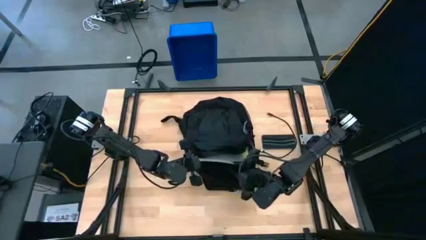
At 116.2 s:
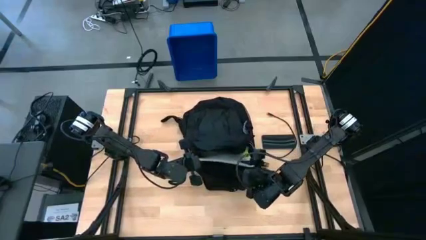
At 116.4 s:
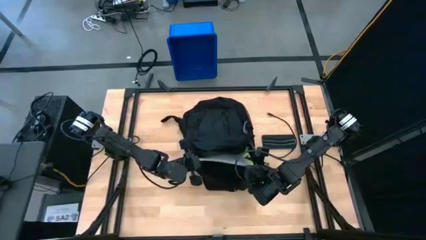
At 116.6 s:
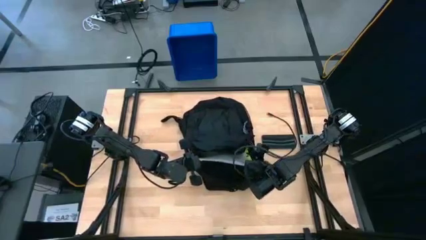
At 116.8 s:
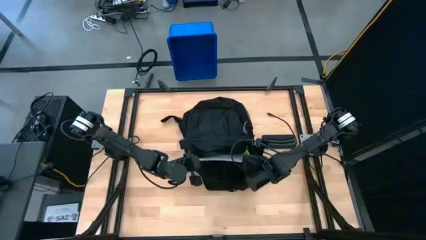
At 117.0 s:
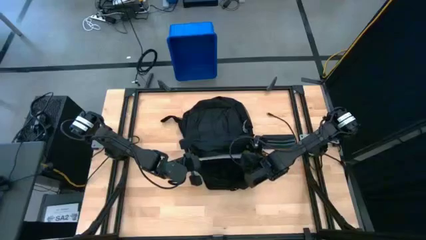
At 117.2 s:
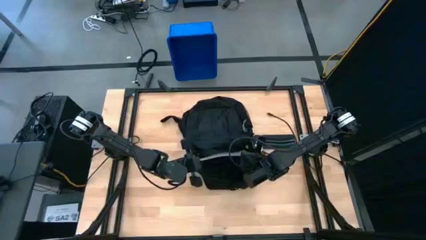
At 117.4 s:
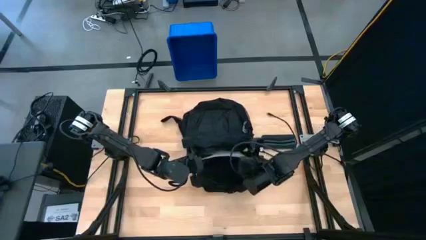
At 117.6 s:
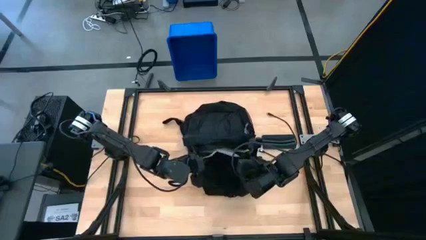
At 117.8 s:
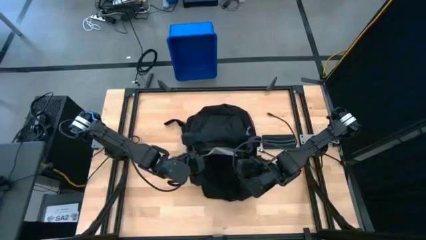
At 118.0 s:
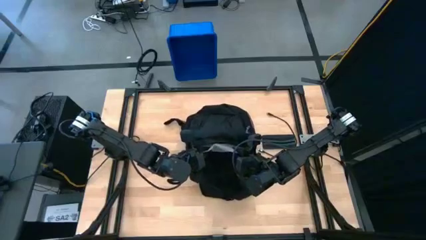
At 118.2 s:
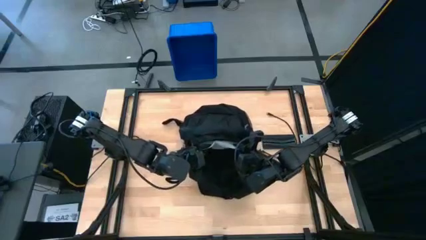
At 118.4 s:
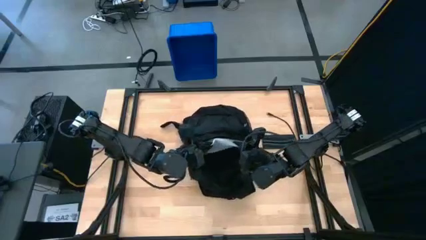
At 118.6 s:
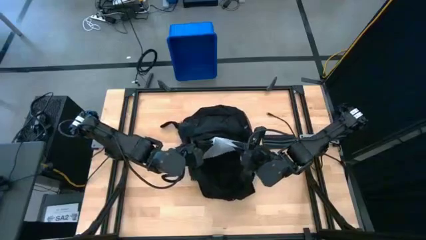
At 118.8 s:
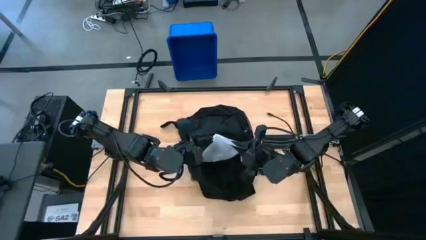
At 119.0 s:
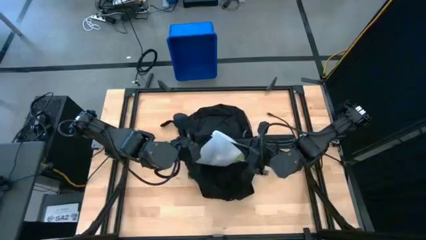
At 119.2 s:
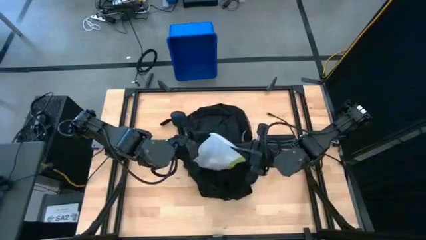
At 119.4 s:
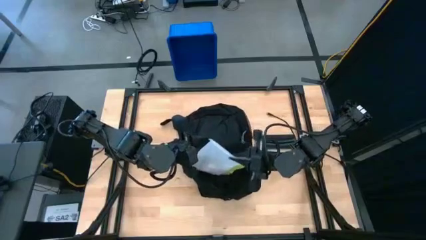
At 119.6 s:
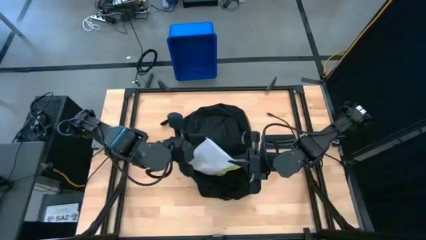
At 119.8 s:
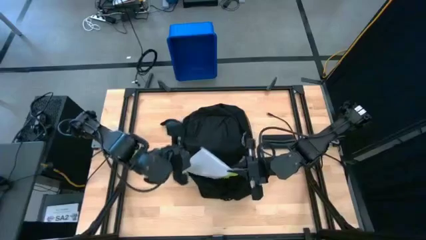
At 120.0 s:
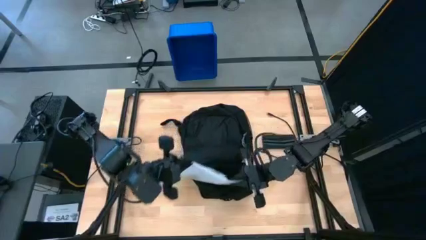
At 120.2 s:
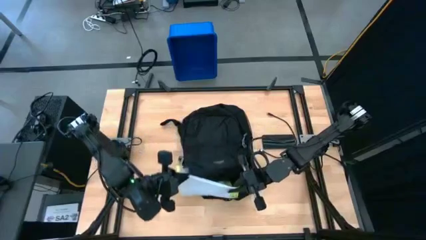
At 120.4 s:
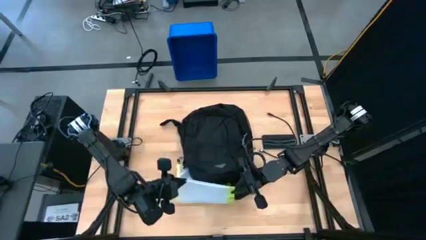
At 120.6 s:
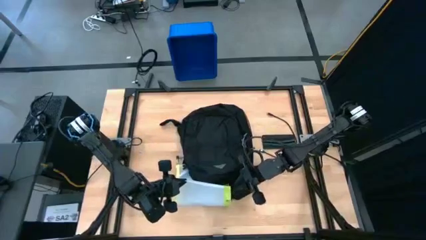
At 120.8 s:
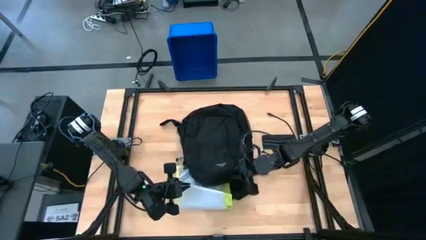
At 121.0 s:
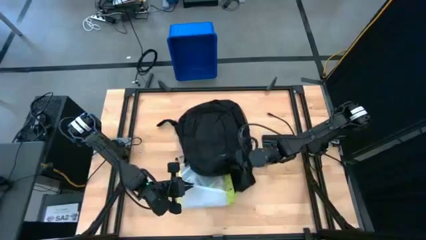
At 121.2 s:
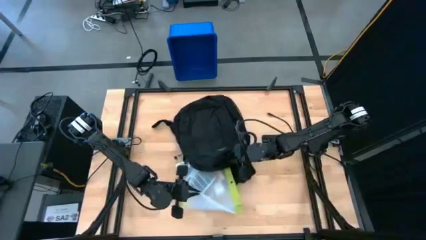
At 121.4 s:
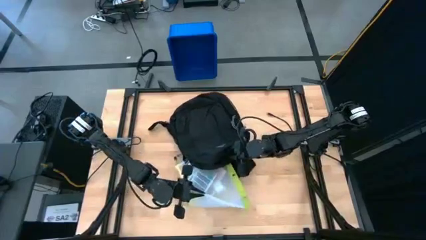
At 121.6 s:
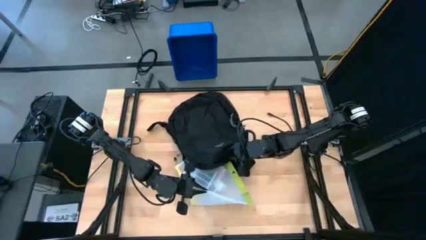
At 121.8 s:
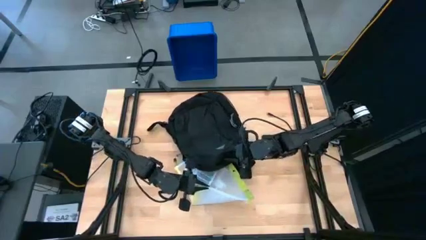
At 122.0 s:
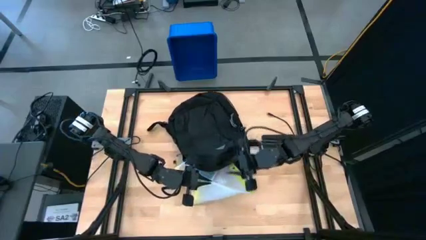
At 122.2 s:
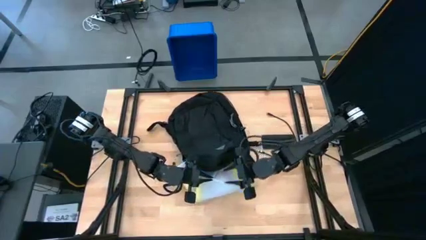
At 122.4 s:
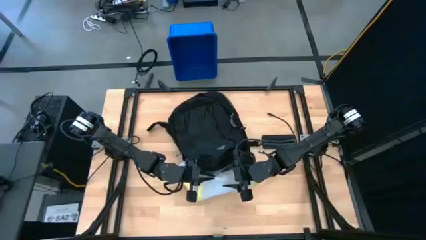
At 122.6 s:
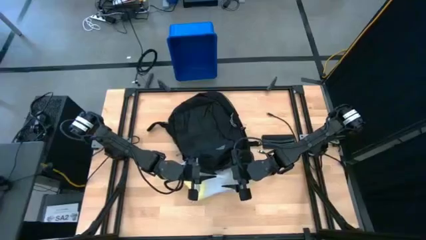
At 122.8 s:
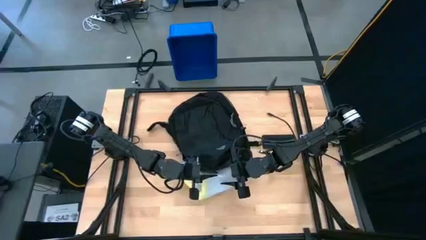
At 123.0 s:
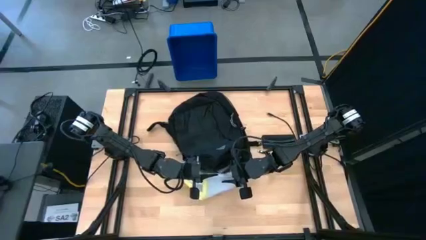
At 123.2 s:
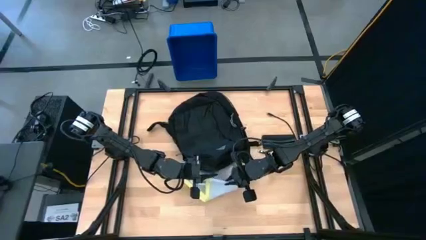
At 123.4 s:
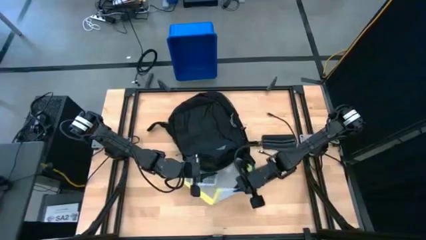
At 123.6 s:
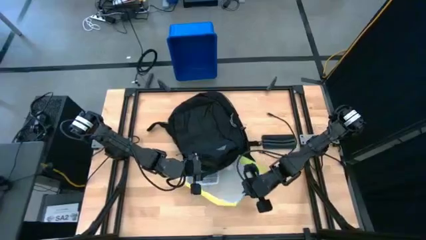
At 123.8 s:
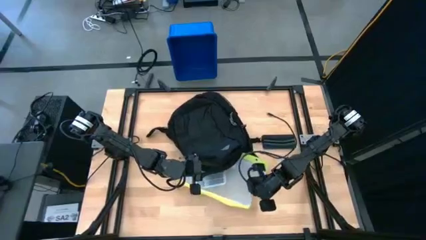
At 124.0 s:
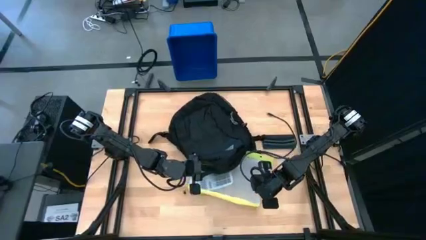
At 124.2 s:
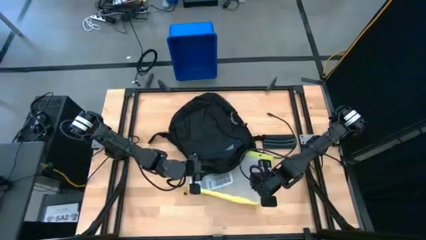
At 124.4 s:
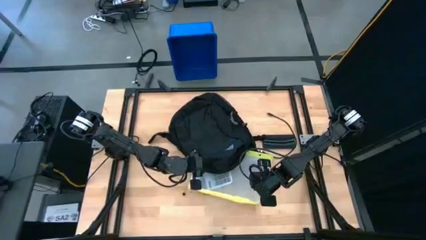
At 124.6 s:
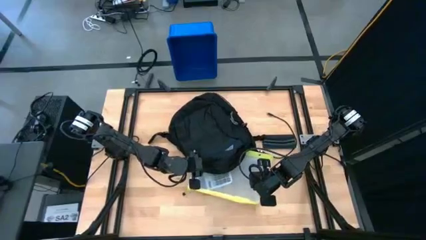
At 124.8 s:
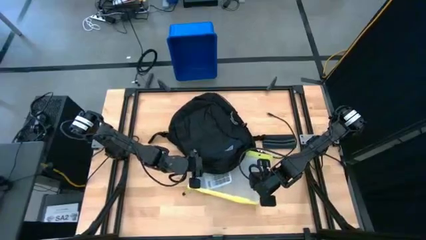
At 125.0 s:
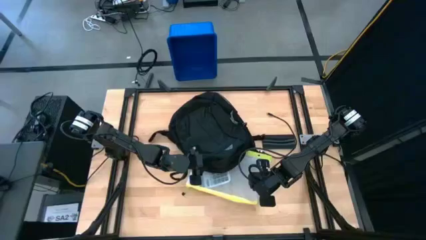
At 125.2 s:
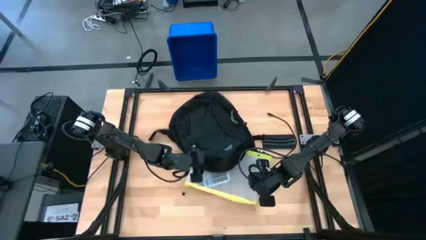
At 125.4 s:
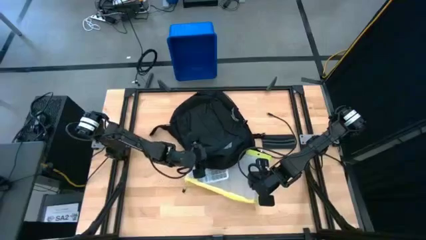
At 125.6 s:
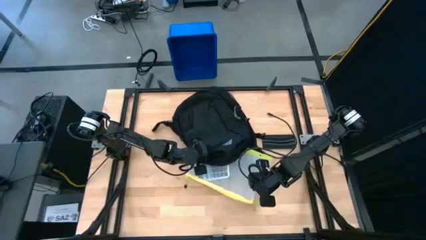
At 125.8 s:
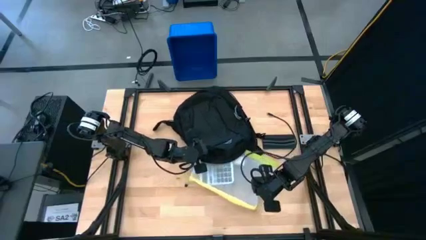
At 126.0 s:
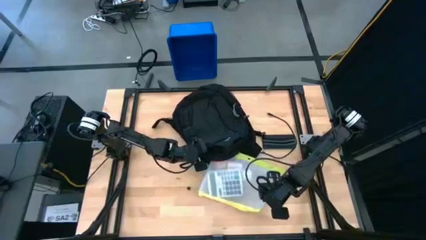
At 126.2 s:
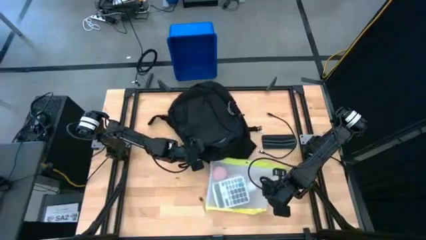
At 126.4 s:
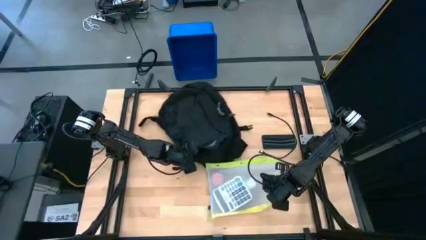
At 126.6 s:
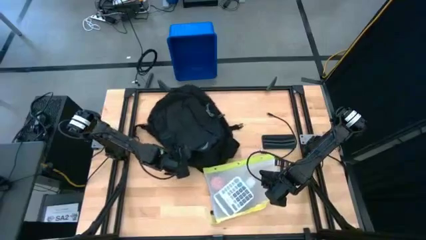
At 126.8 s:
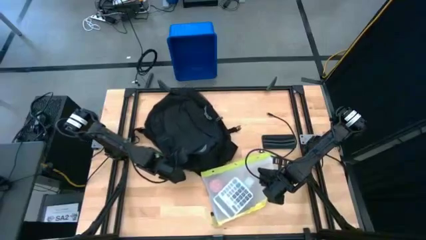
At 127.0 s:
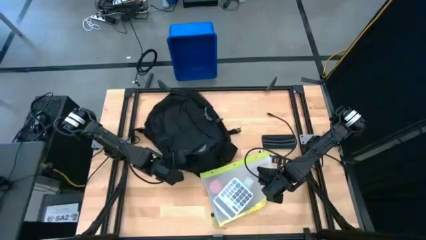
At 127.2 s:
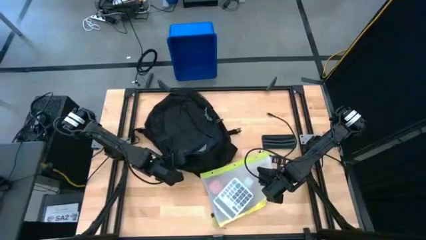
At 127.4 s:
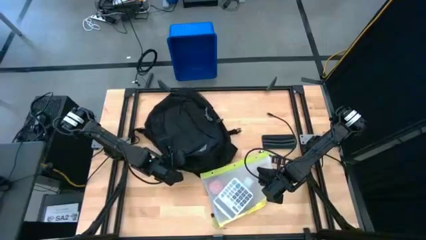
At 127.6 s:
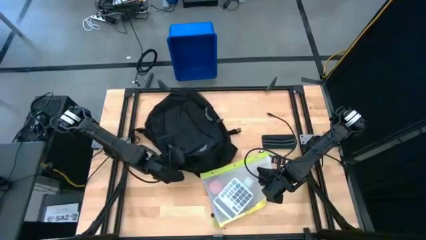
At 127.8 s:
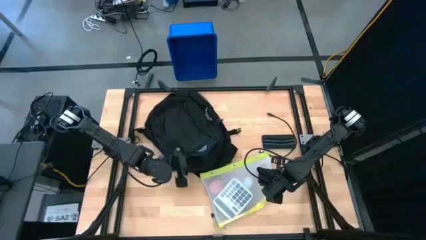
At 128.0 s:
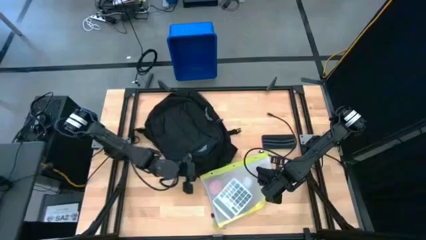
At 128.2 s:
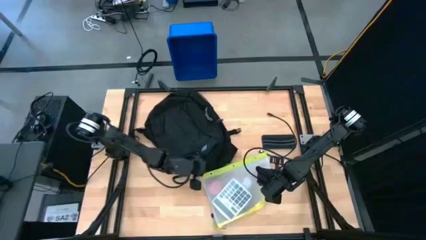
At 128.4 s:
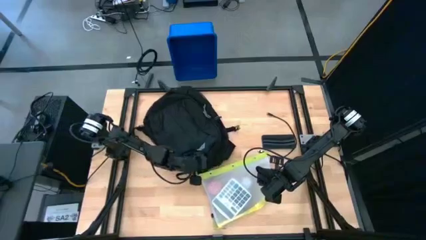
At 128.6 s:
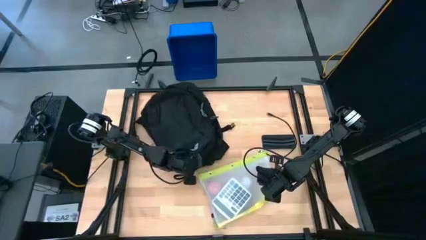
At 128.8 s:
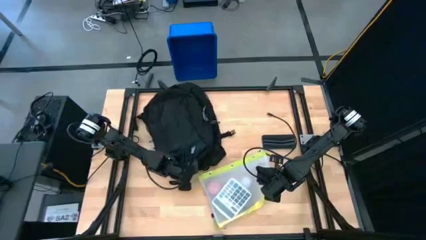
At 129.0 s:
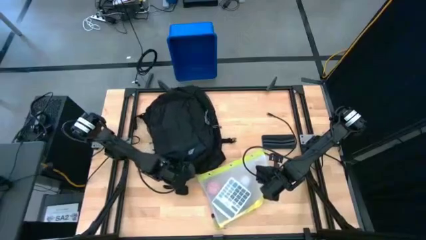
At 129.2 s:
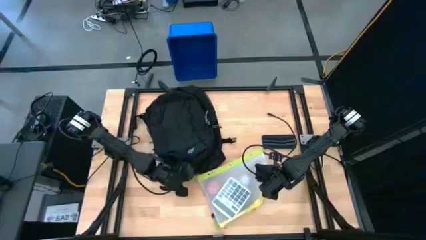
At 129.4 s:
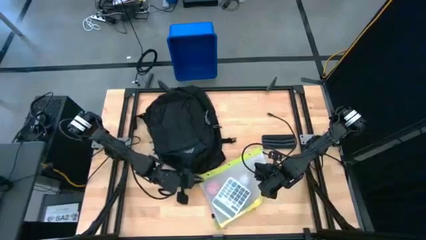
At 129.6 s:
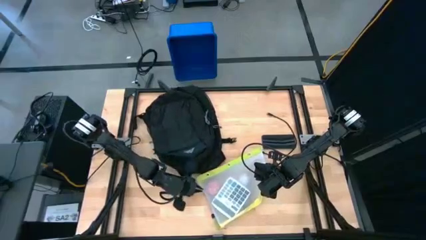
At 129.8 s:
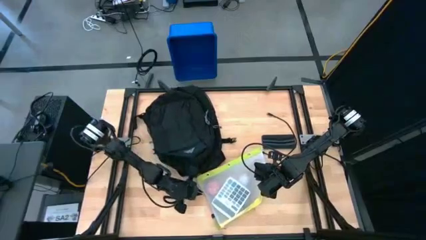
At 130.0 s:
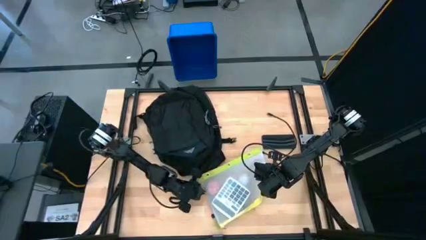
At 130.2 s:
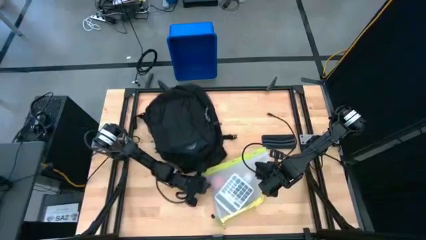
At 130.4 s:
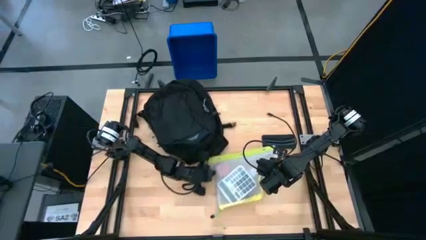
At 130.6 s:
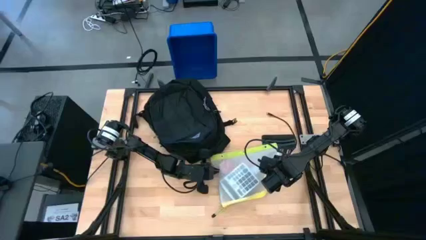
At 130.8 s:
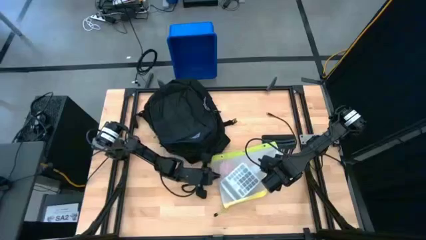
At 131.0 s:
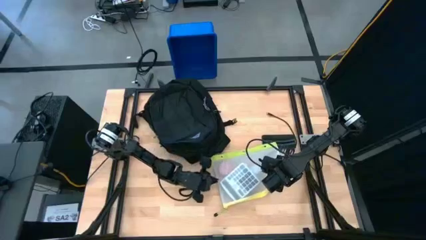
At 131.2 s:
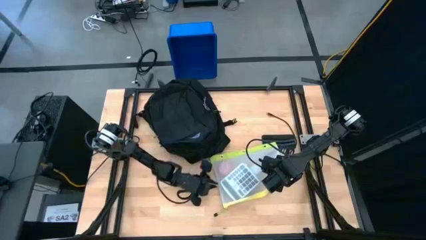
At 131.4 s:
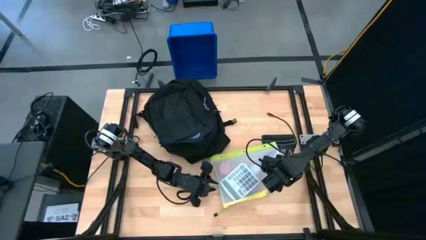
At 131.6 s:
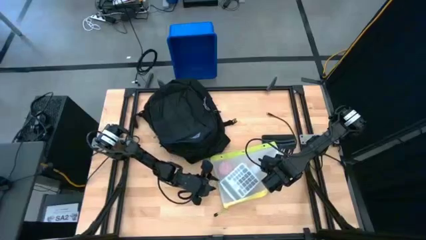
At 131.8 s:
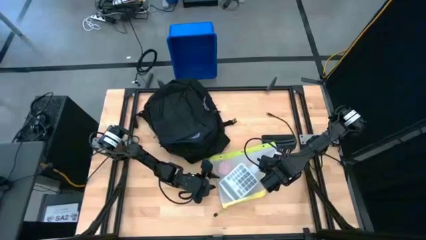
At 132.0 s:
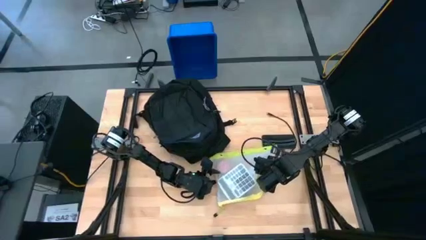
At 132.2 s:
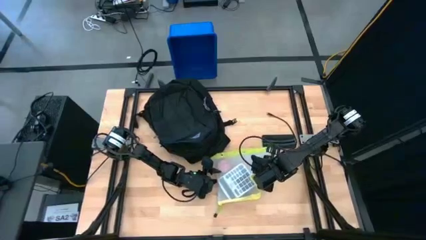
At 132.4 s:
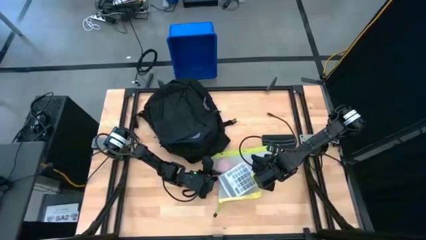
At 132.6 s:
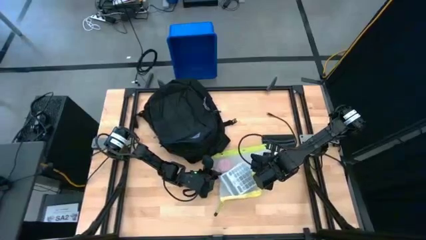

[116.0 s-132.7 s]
Task: Unpack backpack
Remove the zip lock bag from the backpack
